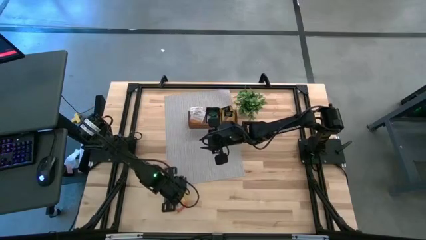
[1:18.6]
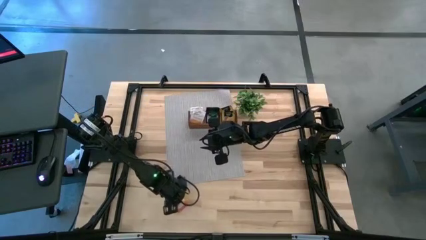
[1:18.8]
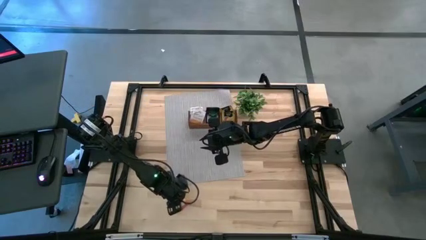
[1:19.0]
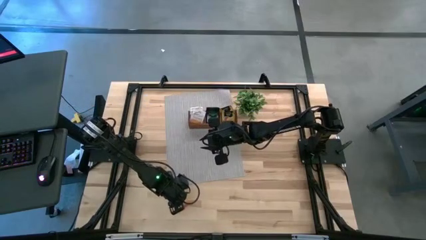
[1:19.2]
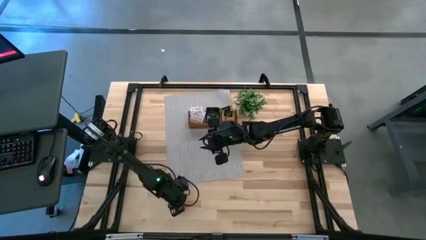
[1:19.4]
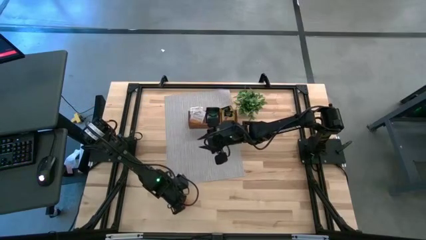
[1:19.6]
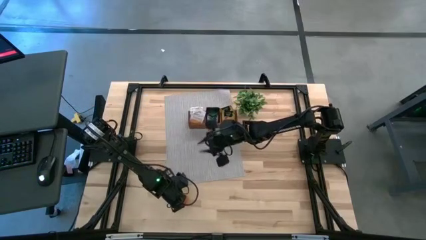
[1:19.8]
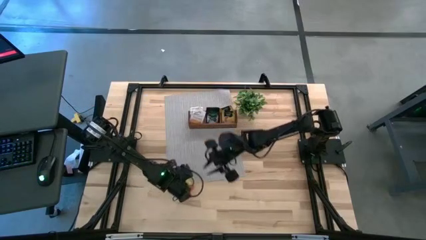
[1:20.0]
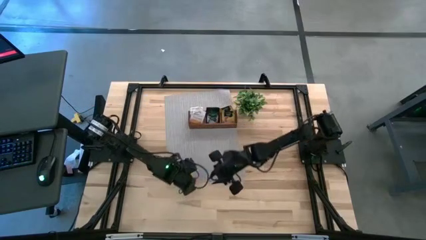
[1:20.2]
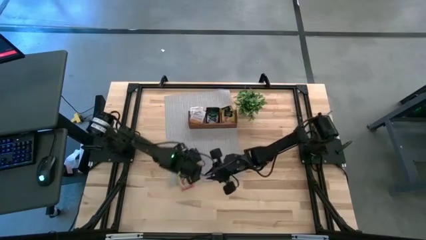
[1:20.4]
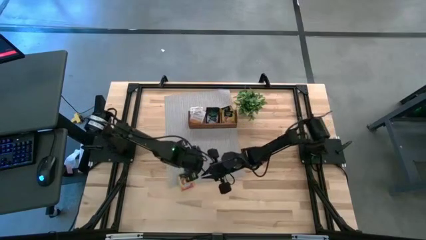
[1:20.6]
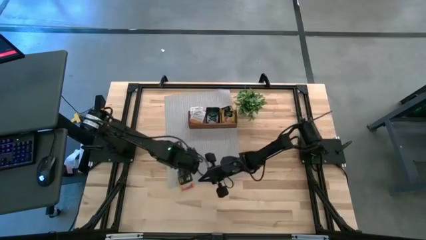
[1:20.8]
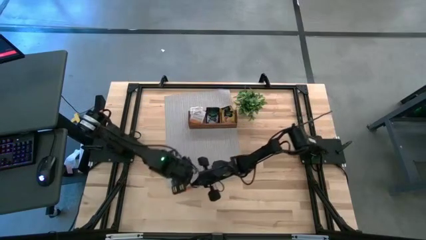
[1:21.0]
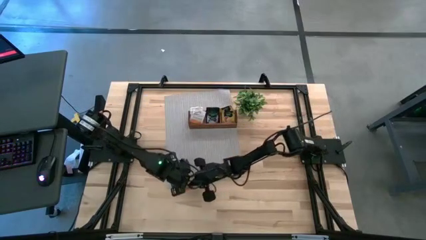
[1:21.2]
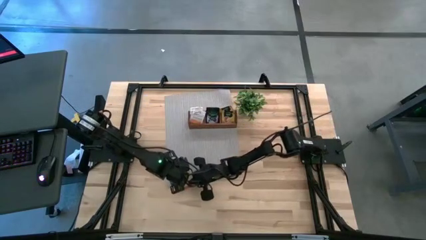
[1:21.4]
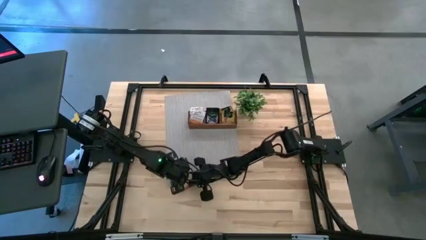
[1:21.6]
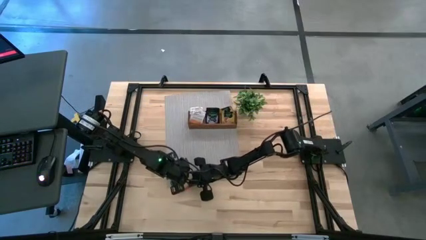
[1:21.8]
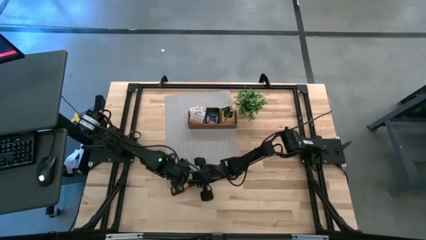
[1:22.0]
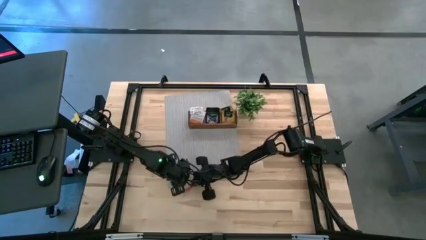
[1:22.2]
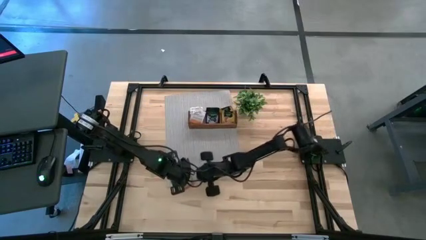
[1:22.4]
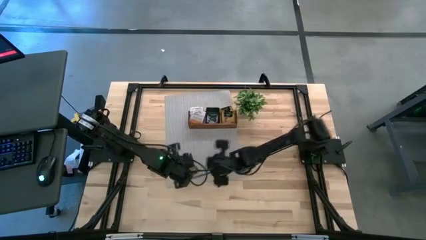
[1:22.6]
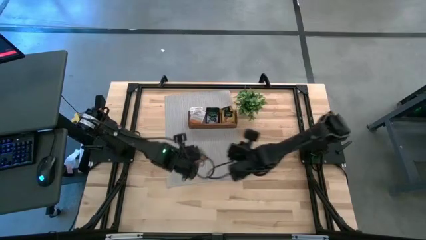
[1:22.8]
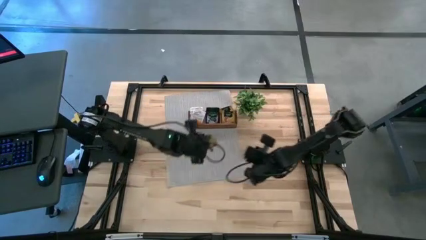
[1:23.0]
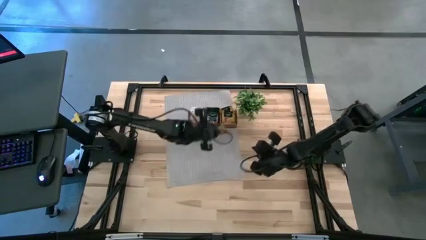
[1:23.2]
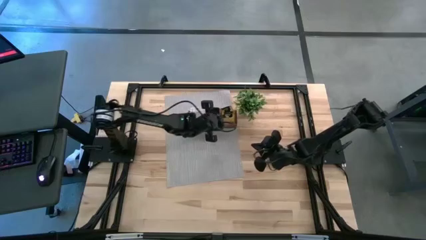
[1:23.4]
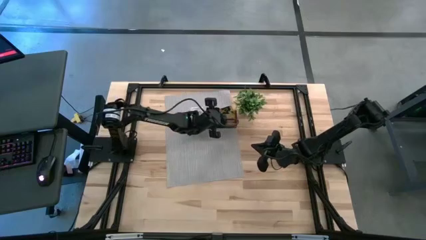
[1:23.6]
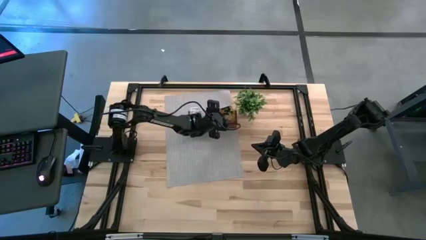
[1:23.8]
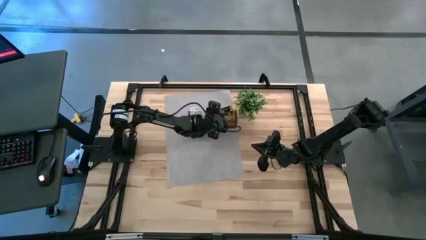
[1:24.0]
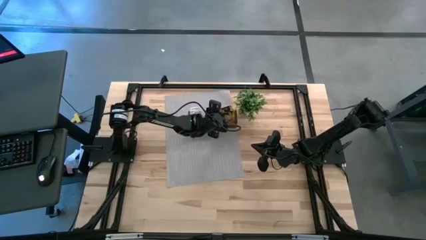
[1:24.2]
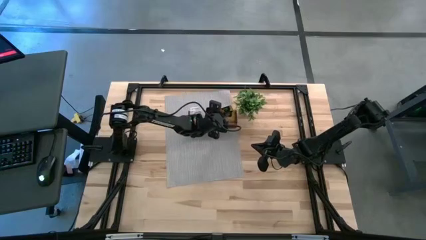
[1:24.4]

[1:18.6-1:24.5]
Task: Pick & Place Tea
Put the orange tea bag in the right section of the brown wooden organizer

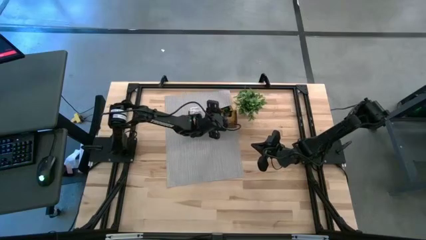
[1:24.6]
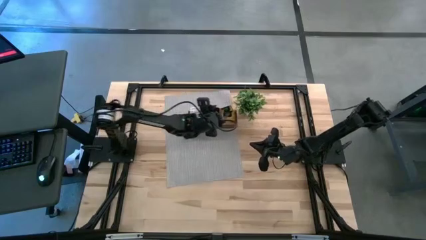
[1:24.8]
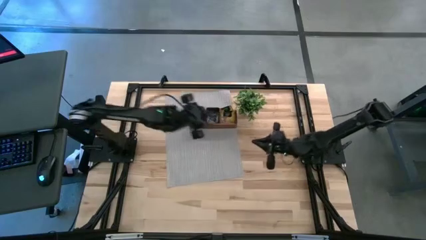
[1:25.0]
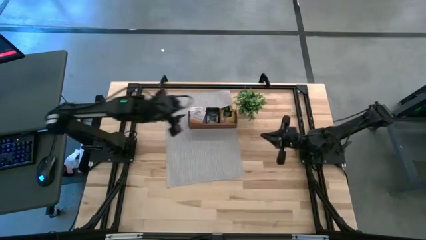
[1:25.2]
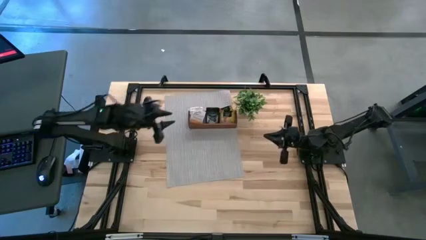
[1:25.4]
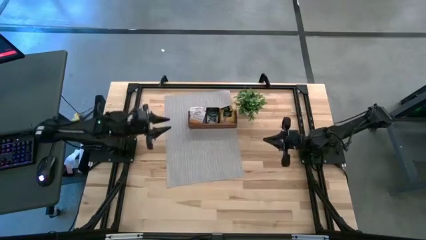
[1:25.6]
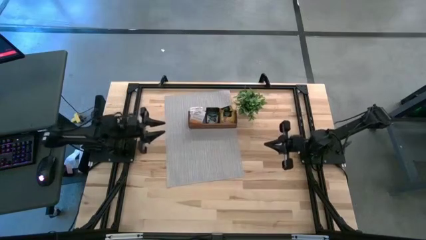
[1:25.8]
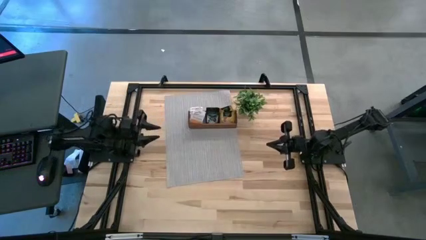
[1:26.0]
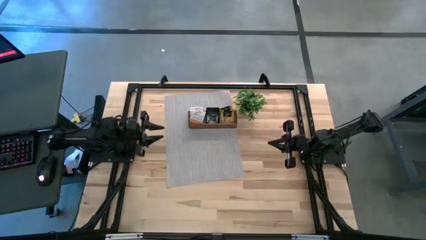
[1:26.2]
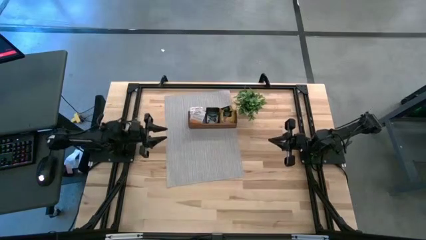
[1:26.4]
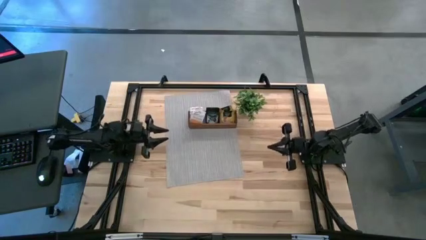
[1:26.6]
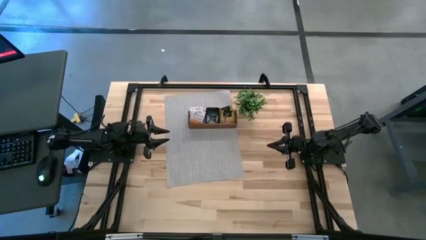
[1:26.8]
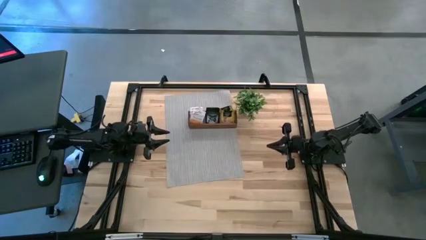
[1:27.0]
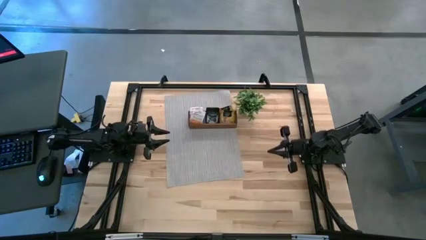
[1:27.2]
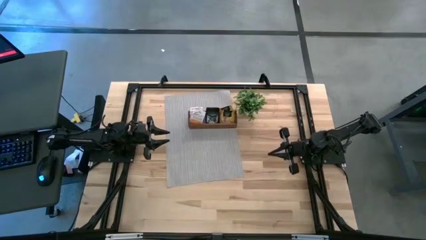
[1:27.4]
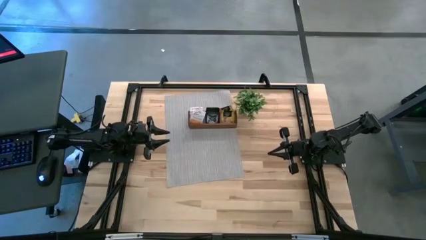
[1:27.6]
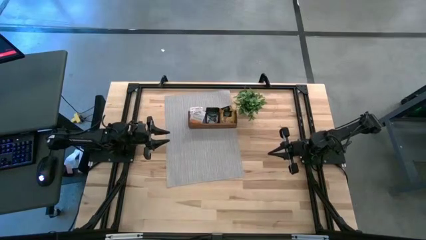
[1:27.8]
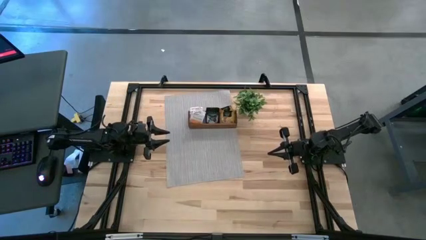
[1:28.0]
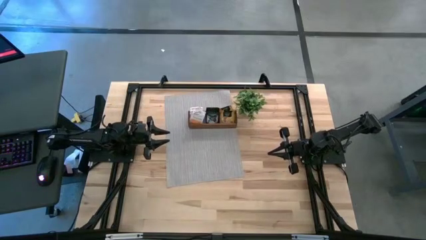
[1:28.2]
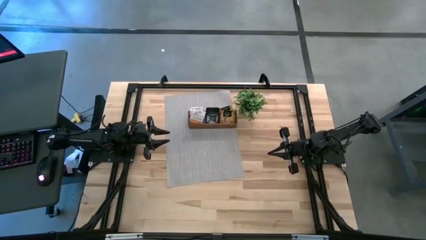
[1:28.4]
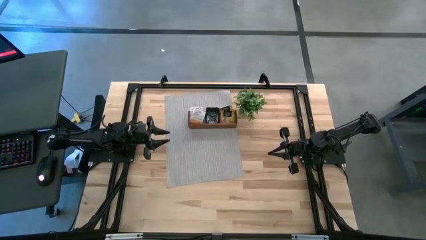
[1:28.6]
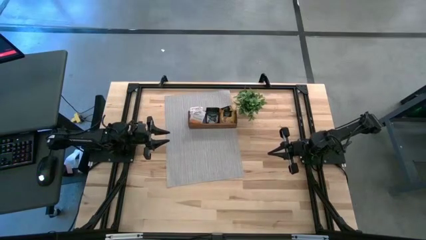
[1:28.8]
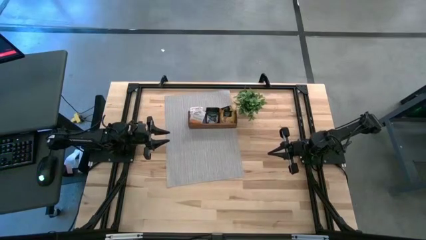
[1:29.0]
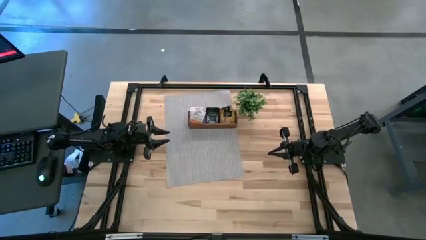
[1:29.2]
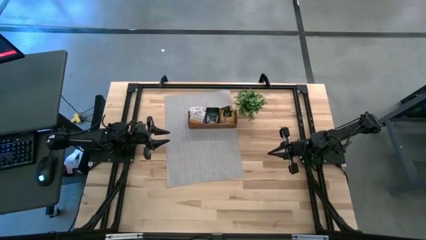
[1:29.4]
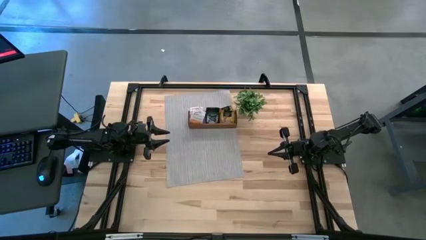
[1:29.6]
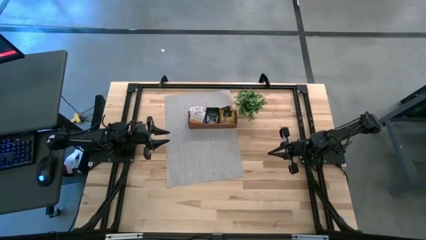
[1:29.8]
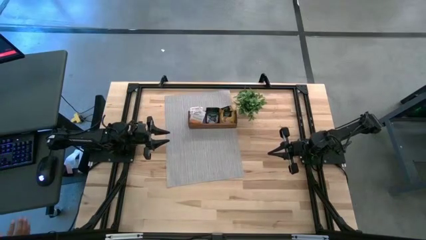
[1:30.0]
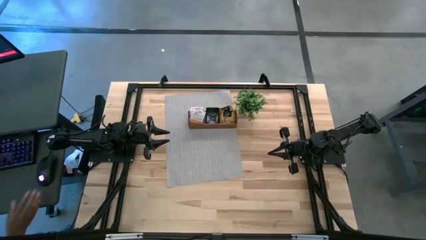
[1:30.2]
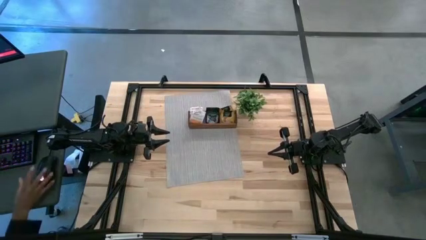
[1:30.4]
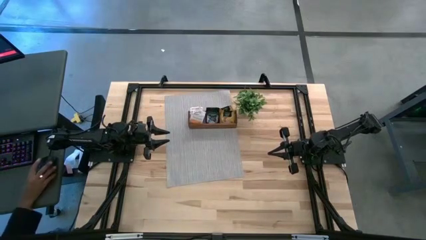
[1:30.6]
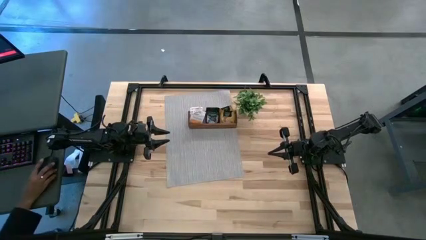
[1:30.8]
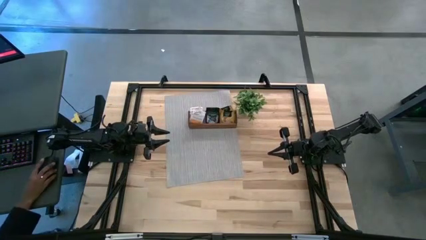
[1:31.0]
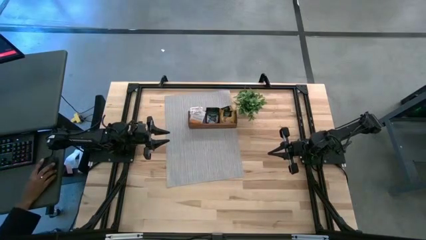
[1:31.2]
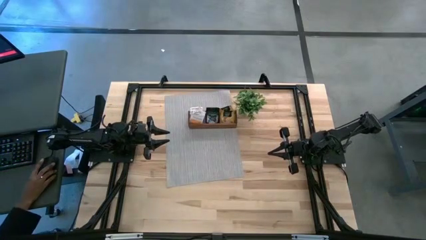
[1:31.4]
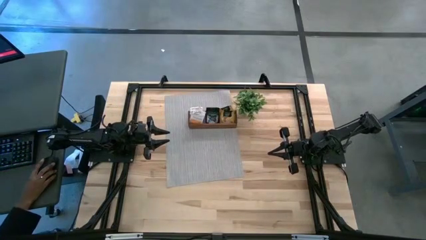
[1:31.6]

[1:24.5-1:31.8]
Return to Home Position

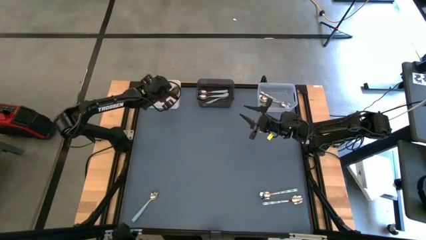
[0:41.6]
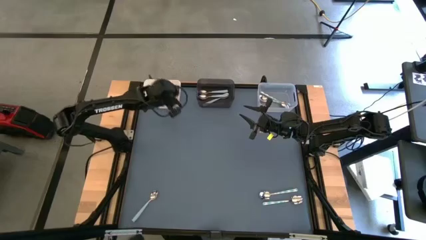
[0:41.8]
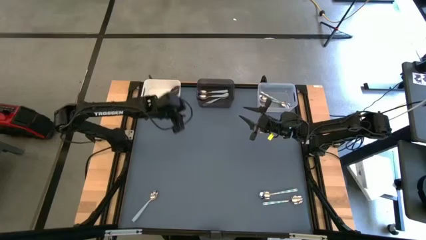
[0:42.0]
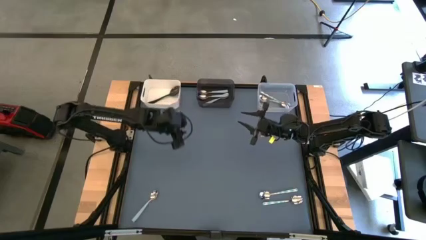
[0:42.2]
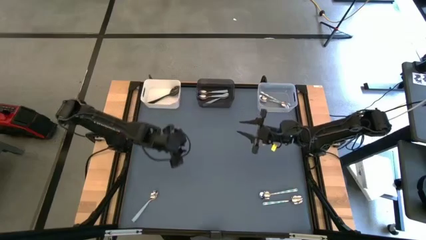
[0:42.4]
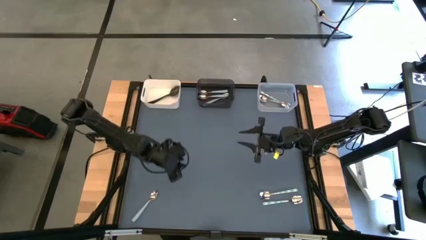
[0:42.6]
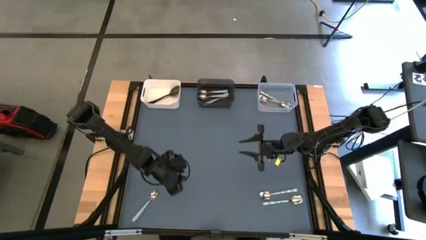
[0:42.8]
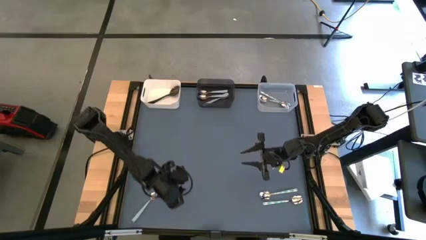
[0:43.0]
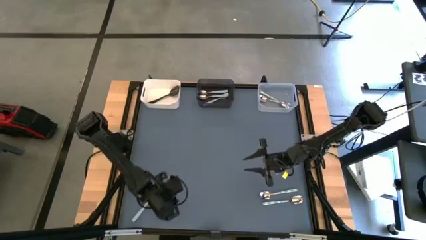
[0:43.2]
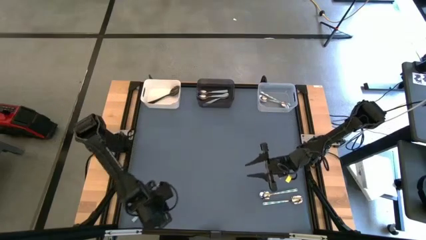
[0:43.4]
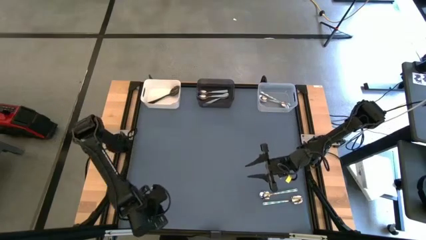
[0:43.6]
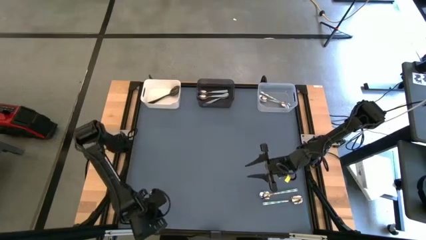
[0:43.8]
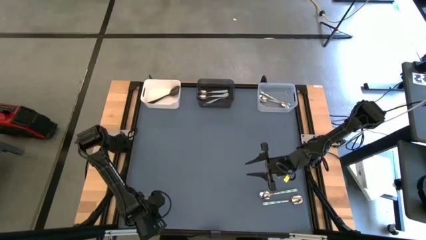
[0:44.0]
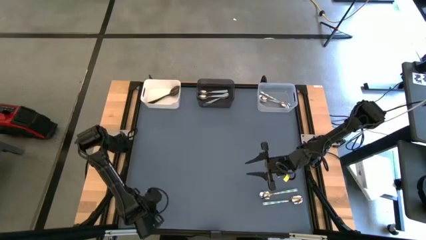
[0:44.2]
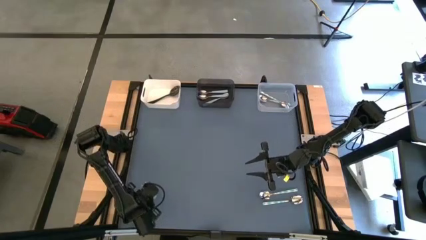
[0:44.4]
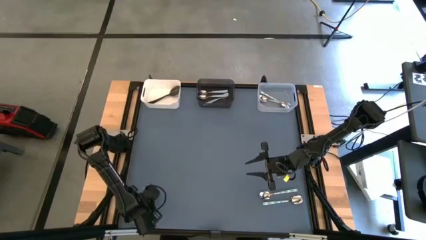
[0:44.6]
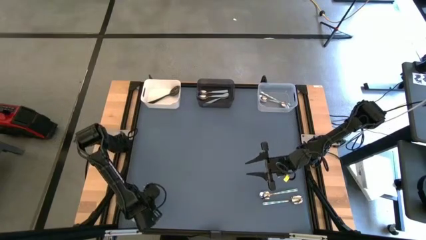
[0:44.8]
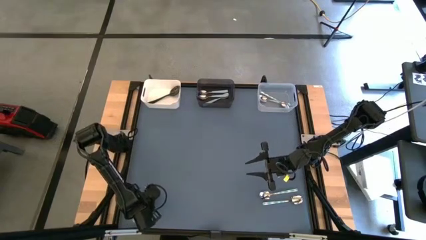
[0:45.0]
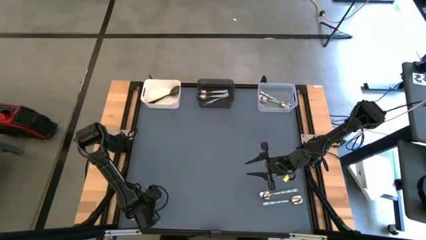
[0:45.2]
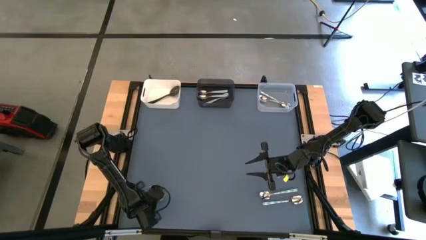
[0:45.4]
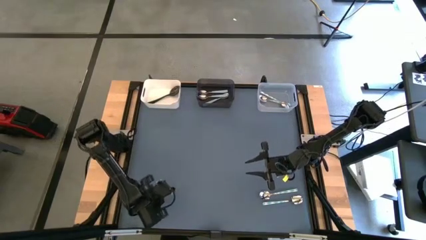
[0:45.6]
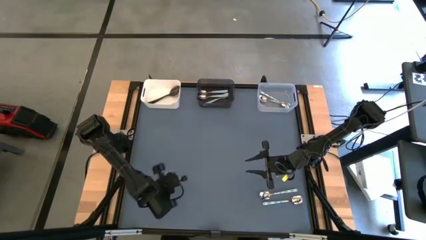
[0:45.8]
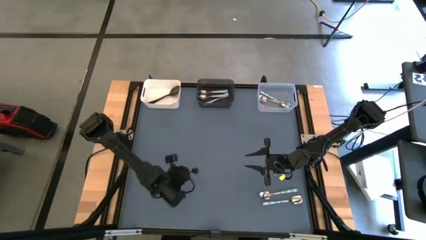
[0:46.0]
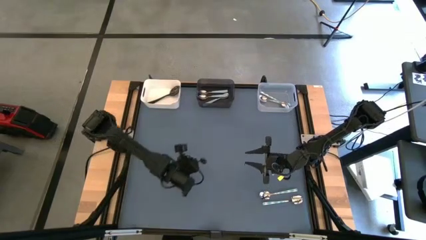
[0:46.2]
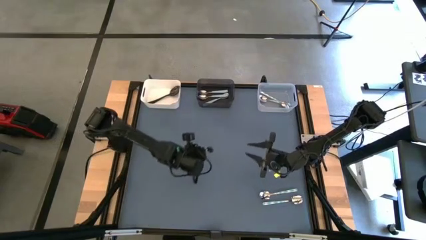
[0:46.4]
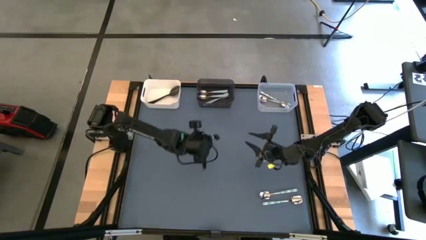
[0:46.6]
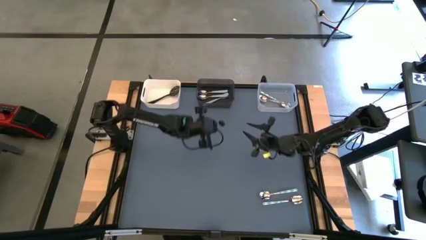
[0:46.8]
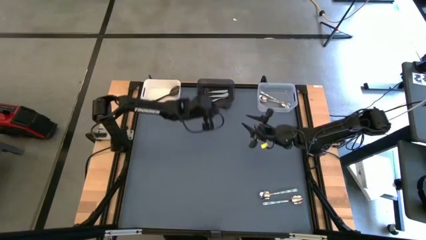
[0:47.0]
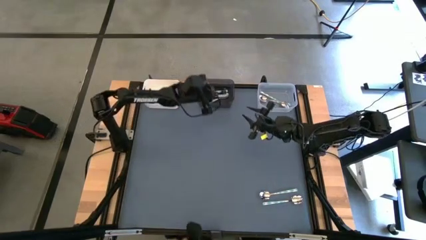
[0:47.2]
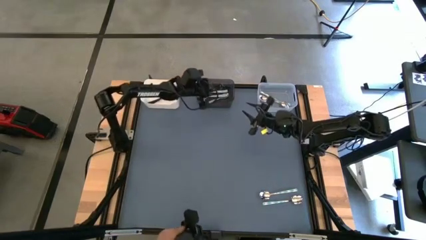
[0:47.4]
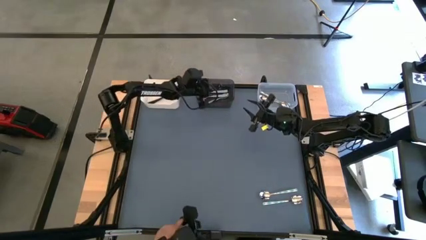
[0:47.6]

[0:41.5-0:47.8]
Task: Sort silverware by color (type)
Put the sky blue spoon into the black bin
